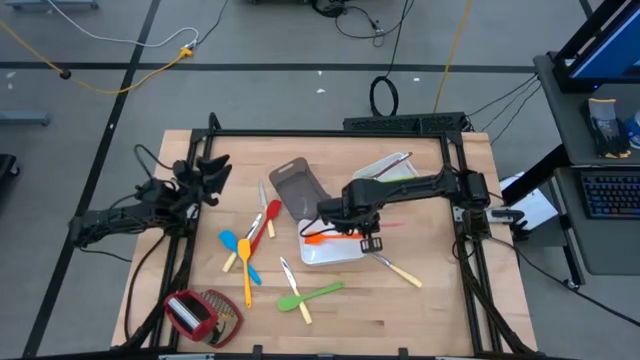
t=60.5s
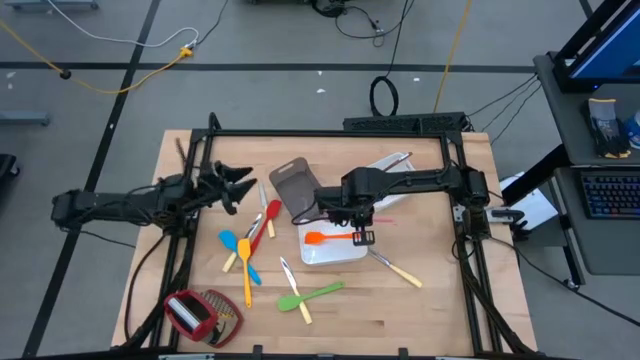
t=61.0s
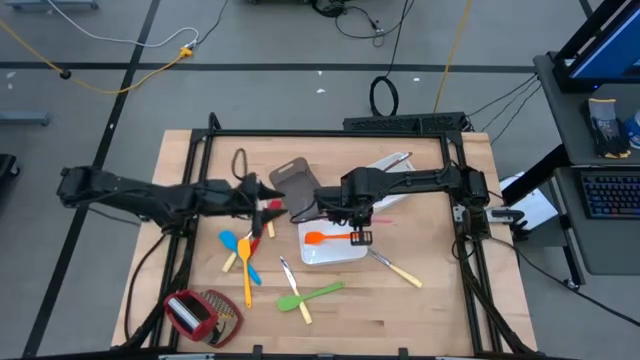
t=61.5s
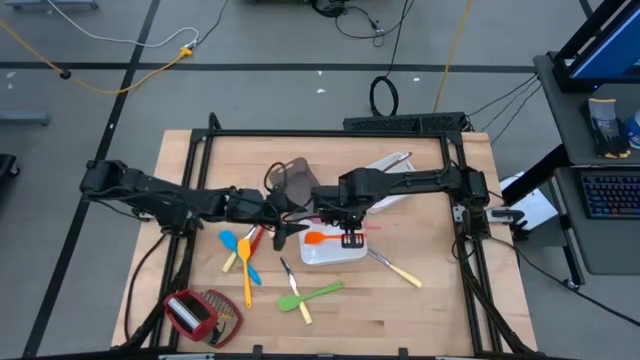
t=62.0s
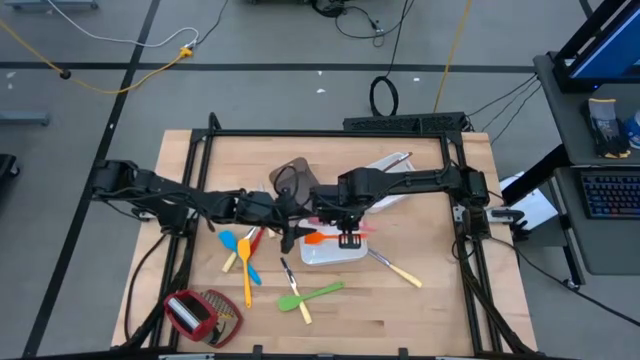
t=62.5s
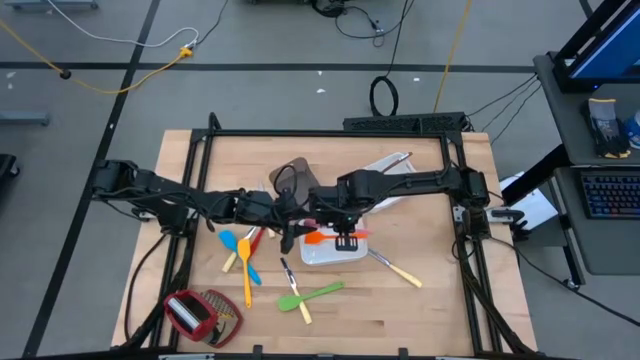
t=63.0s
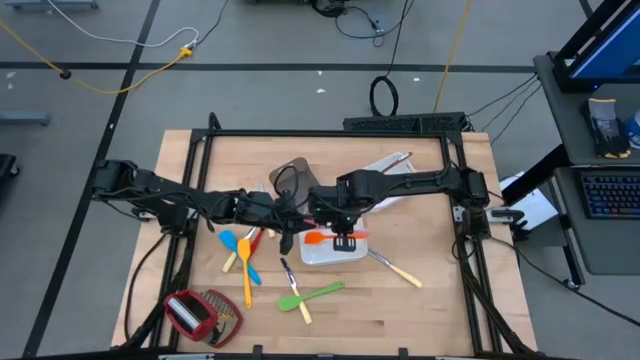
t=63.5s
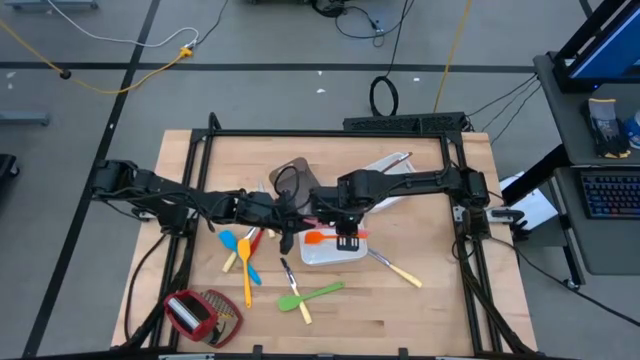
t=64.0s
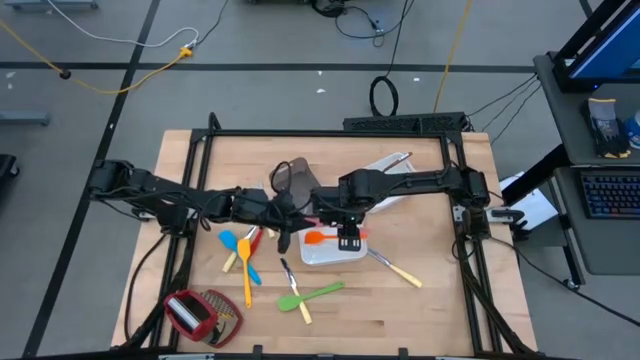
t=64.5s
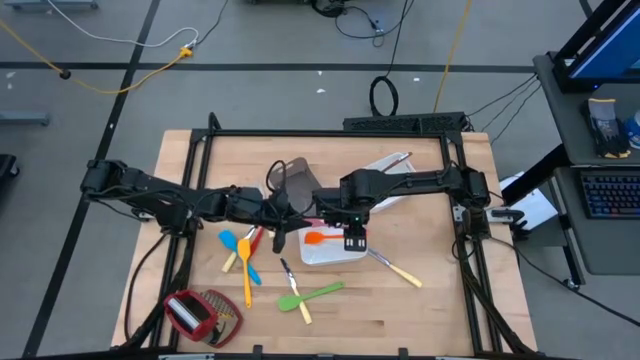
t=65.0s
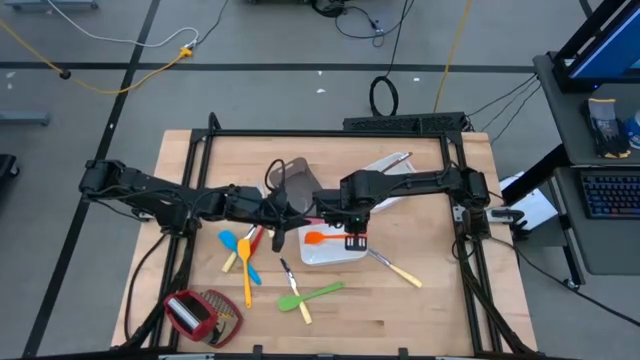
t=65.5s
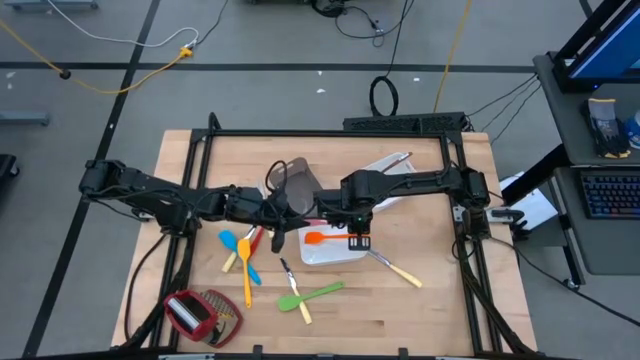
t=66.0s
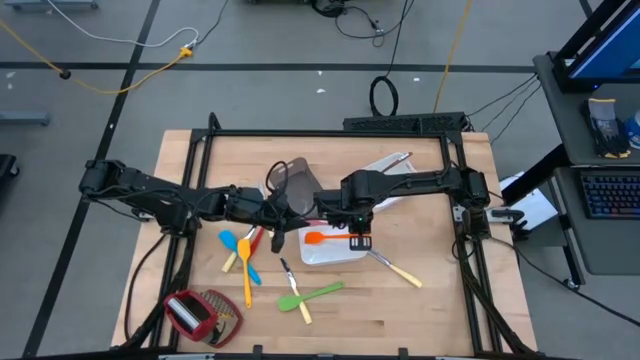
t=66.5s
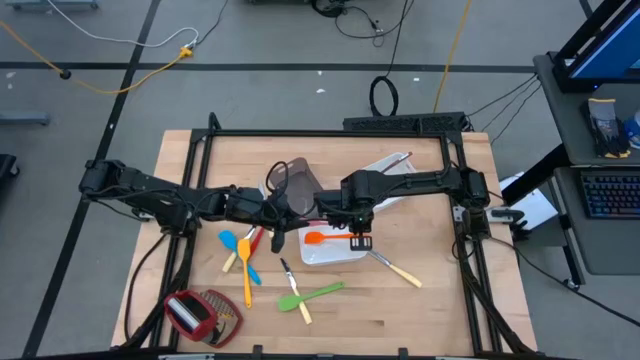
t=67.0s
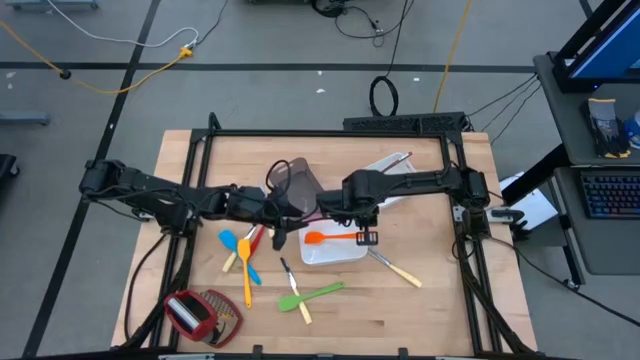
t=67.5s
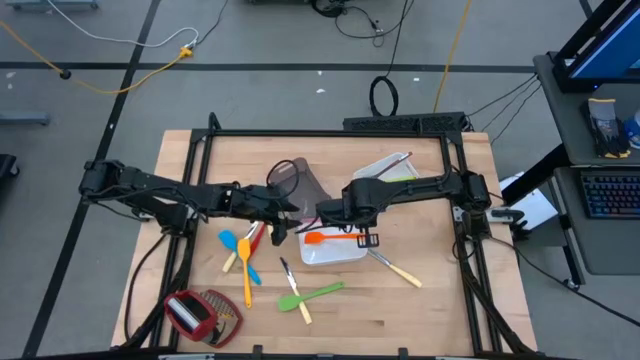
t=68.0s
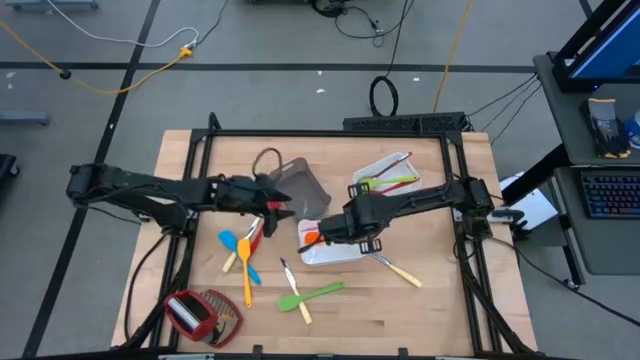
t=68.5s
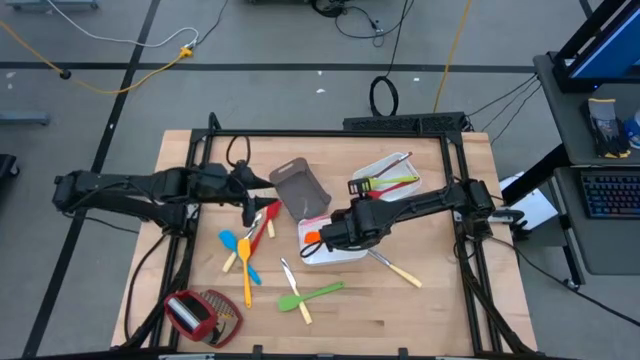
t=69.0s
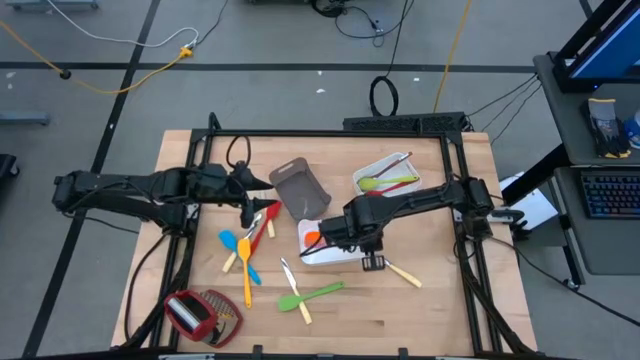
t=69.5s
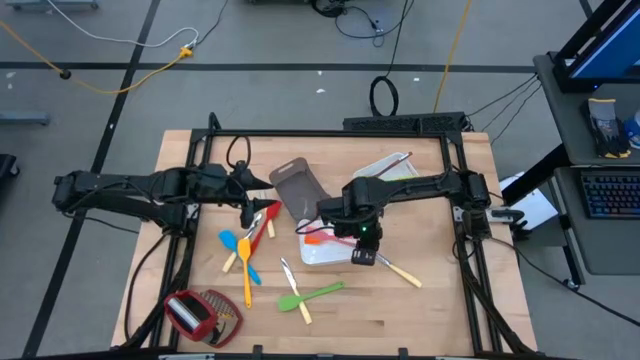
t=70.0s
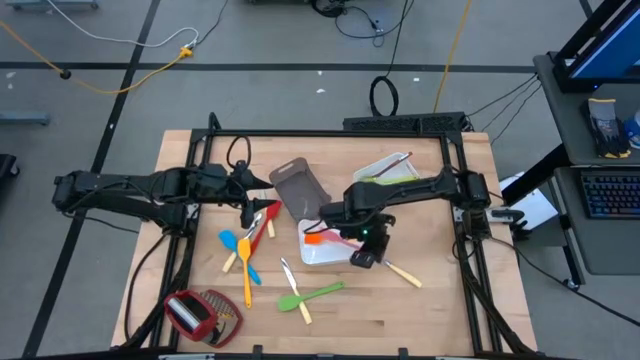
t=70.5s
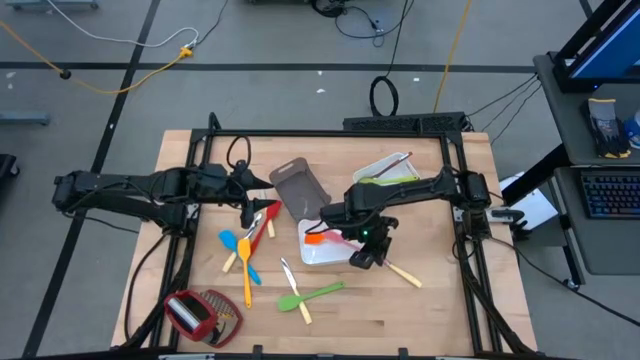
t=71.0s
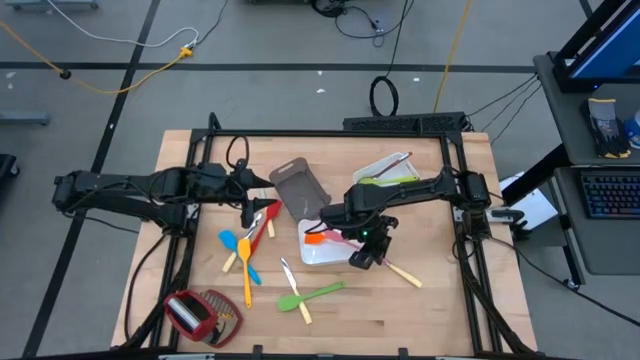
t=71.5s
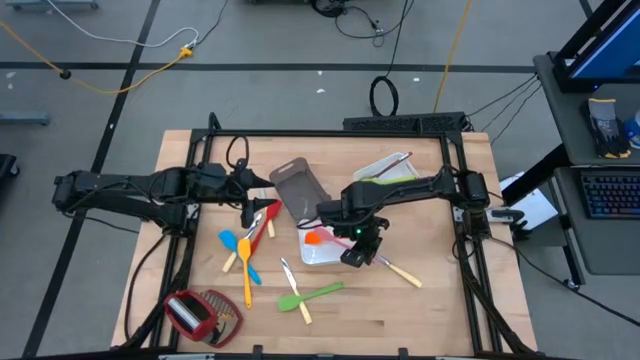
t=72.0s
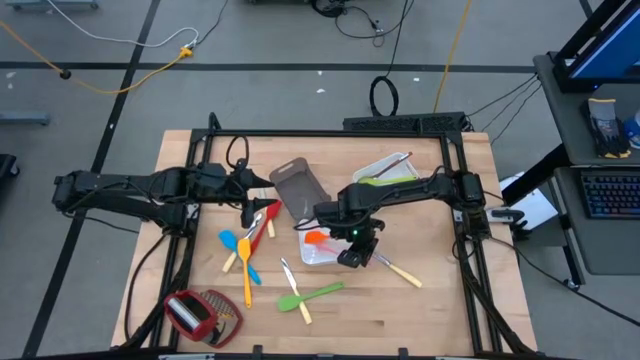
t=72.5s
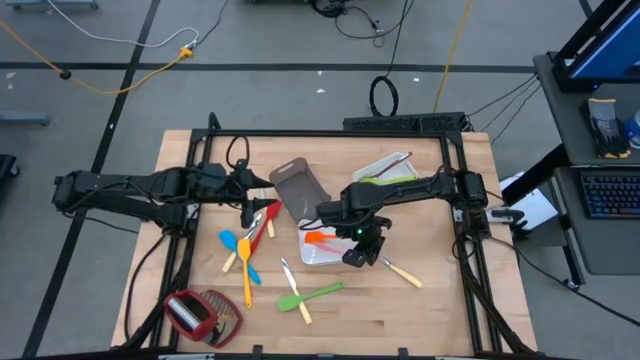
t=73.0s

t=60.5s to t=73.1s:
Task: Pick & Place Kitchen Items
Put the pink spatula into bottom white bin

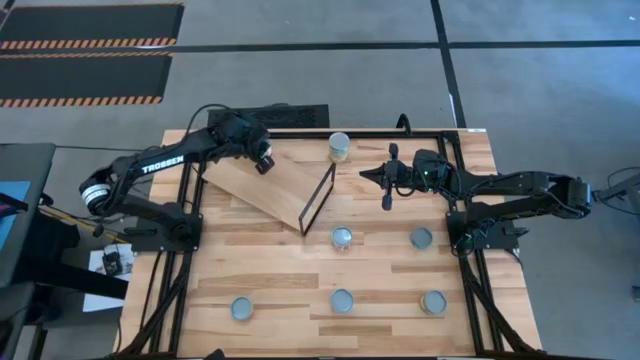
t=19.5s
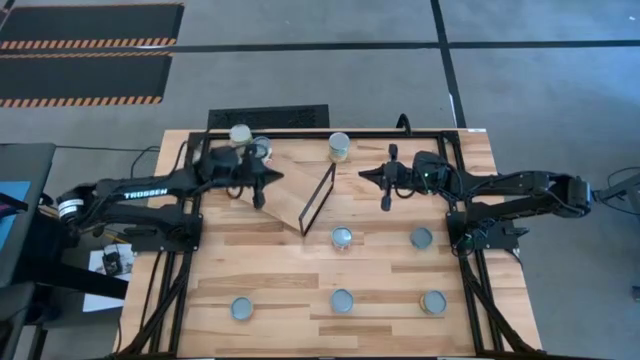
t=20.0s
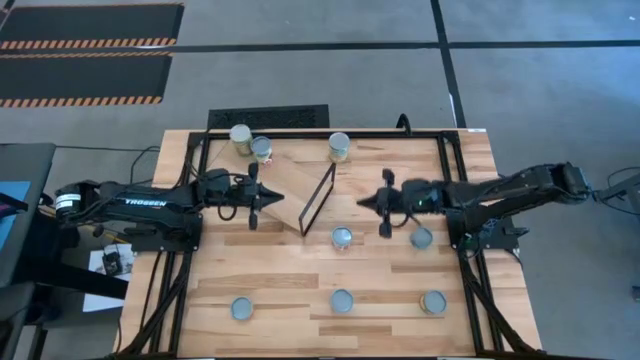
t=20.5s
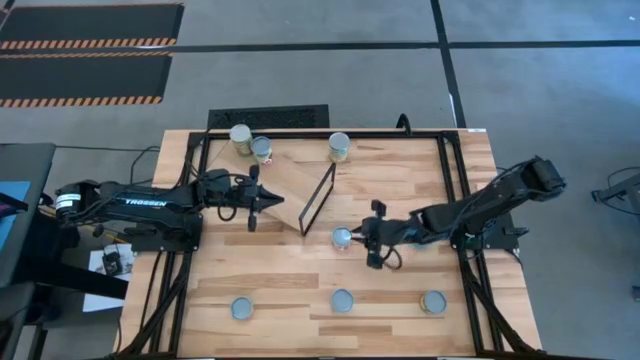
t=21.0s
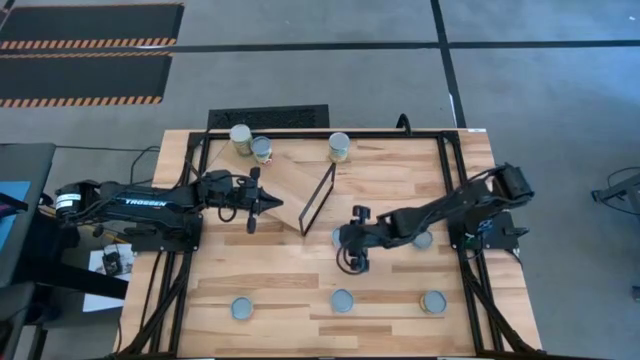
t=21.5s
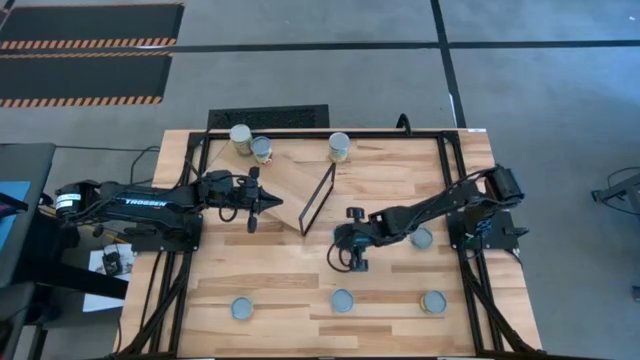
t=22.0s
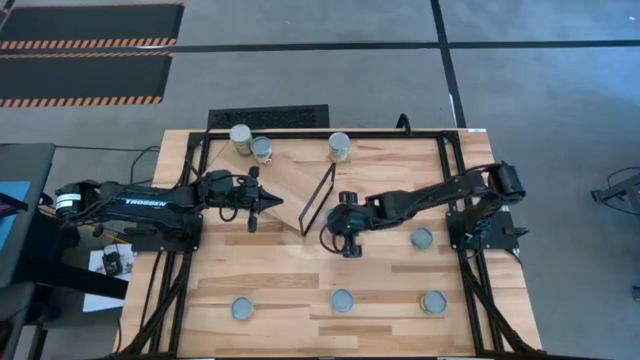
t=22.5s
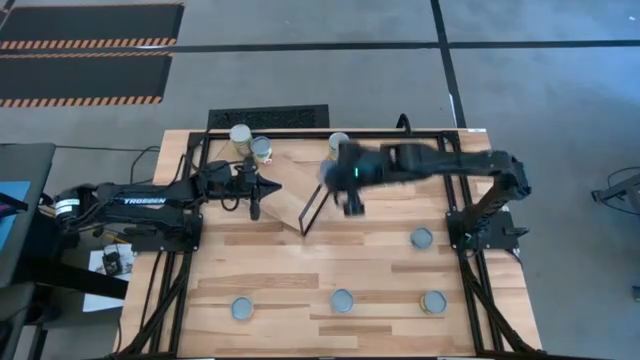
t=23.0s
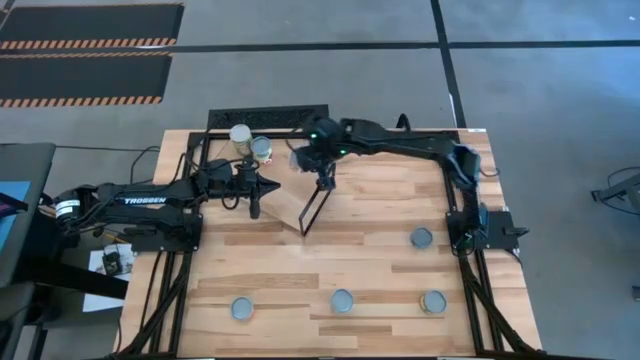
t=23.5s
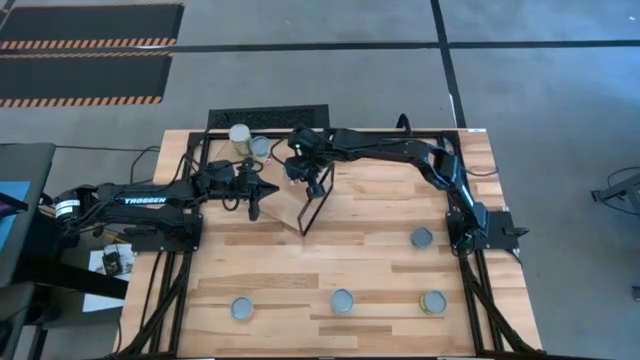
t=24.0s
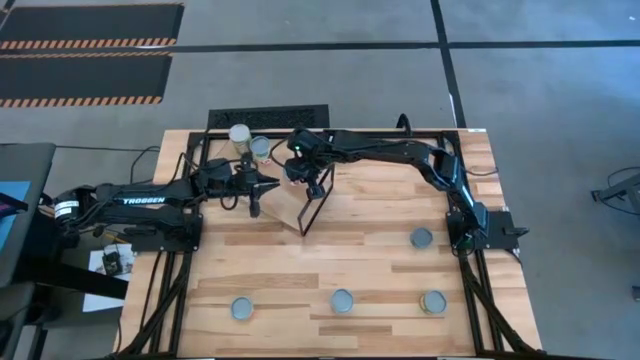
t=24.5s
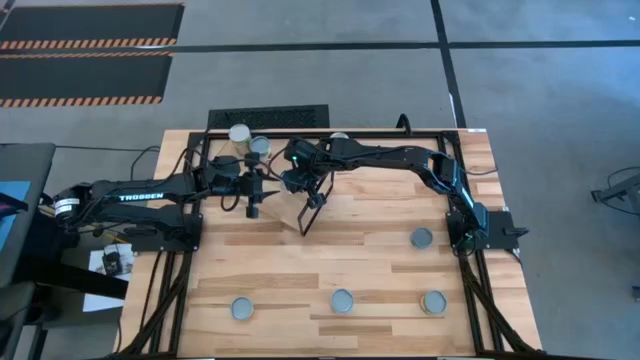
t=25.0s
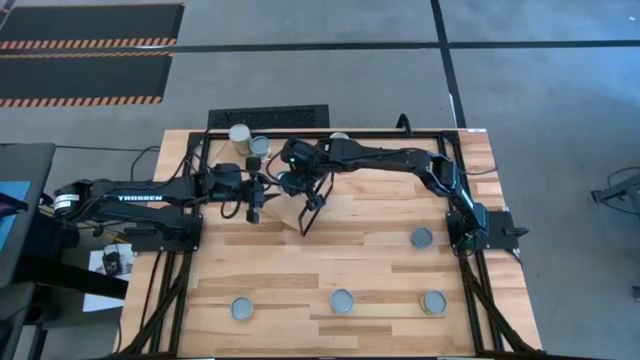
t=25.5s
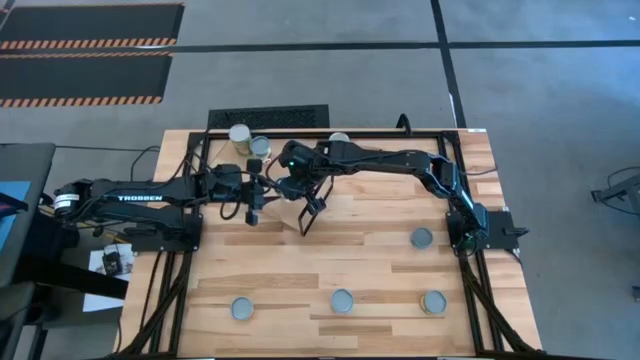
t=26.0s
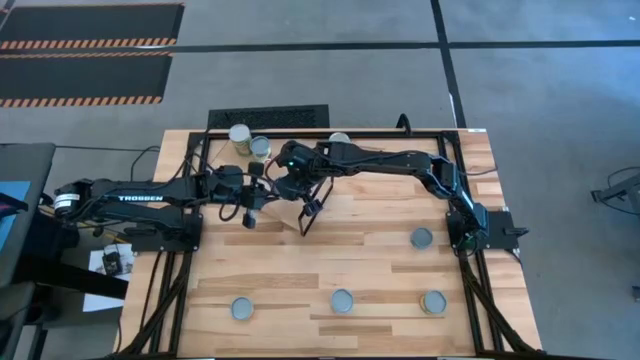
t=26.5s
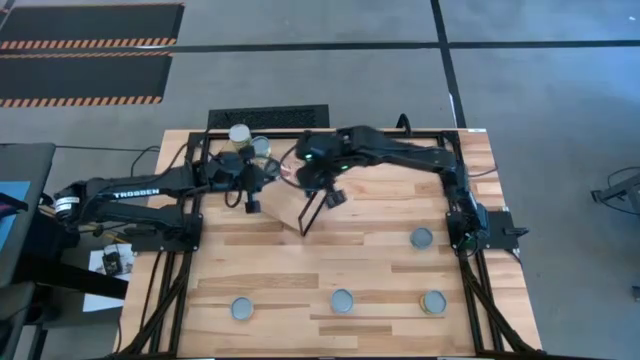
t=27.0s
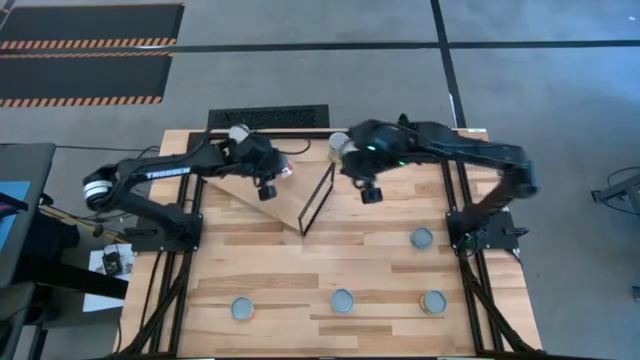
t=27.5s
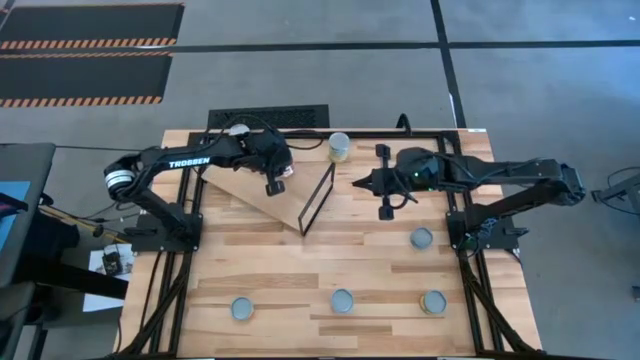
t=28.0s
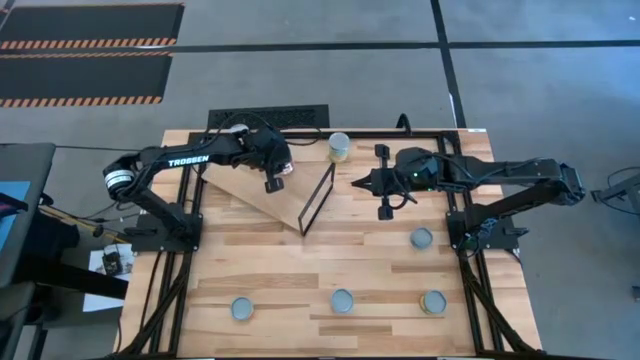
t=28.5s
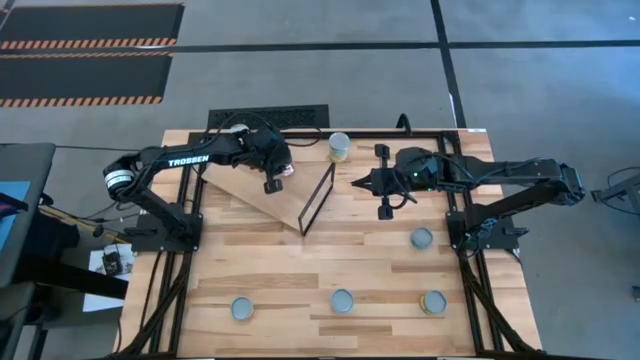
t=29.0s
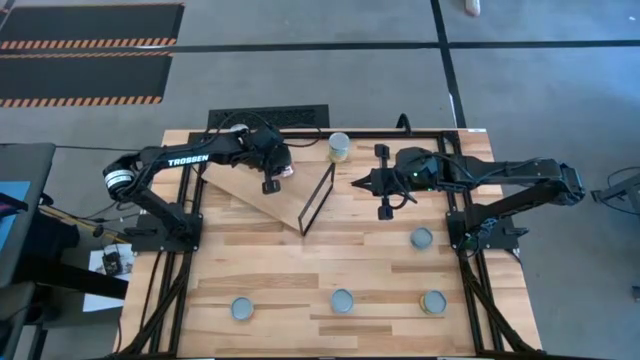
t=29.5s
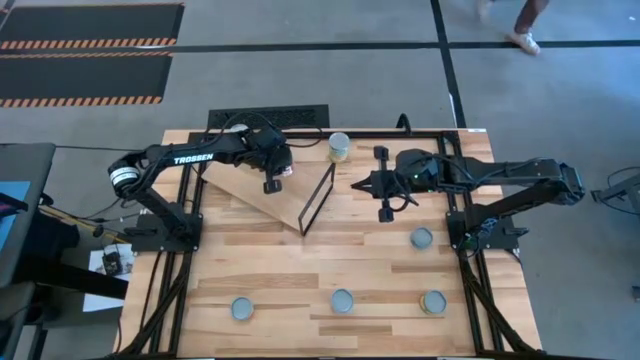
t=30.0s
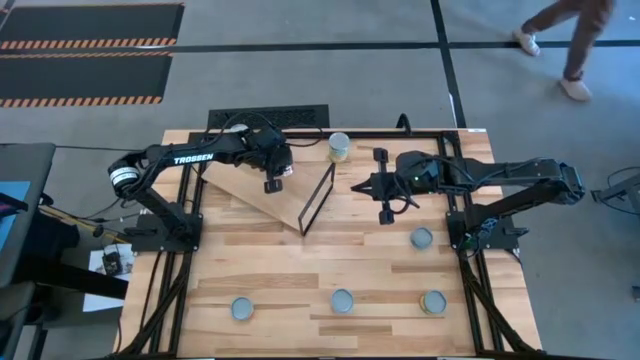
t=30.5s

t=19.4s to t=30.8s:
Task: Pick and place cans onto a shelf
Put the canned diced tomatoes on the shelf
